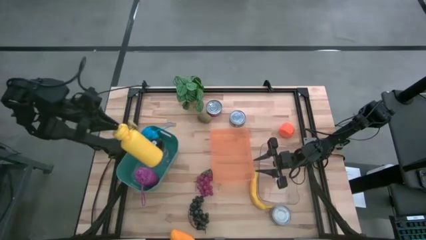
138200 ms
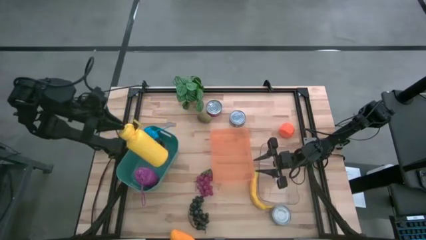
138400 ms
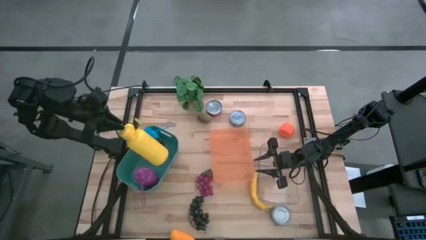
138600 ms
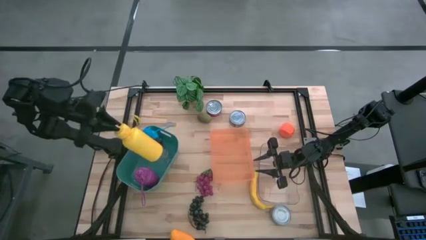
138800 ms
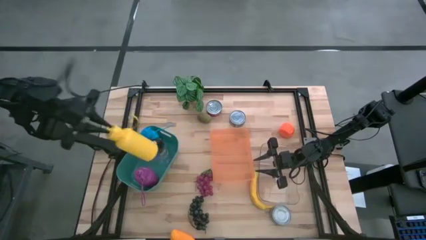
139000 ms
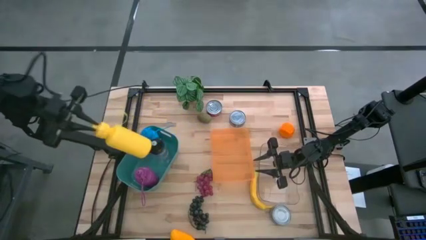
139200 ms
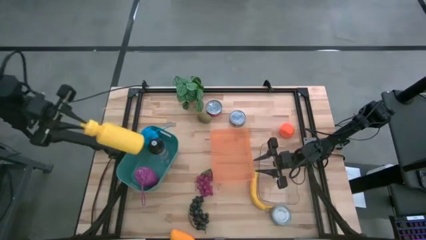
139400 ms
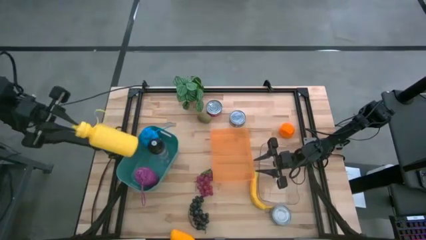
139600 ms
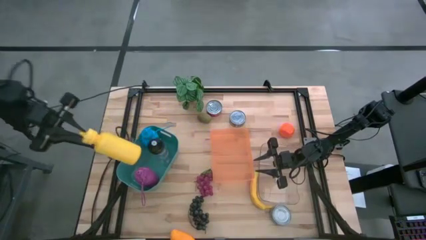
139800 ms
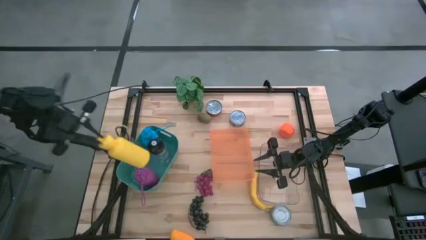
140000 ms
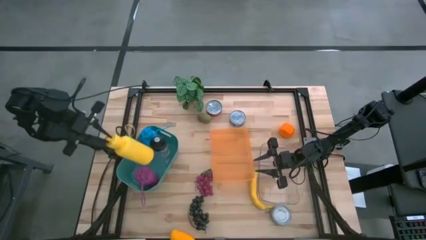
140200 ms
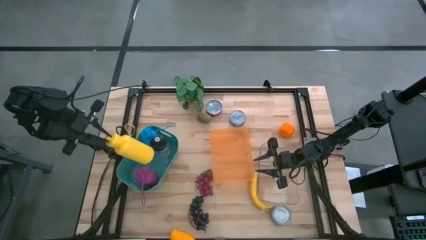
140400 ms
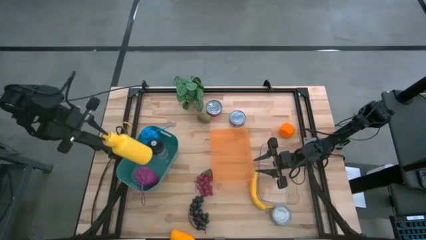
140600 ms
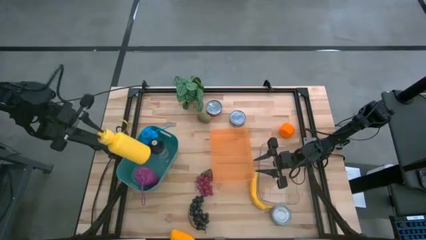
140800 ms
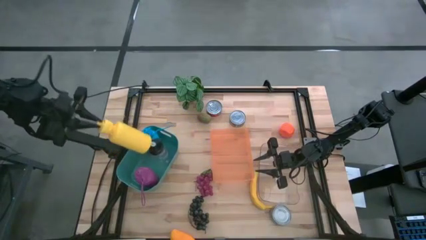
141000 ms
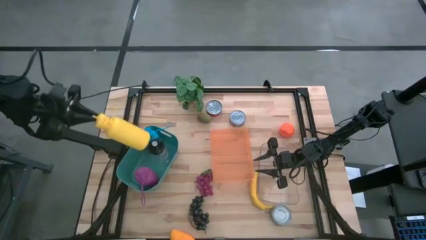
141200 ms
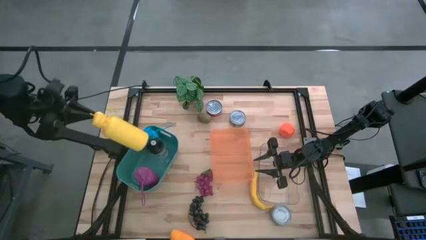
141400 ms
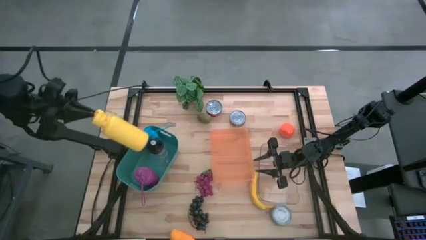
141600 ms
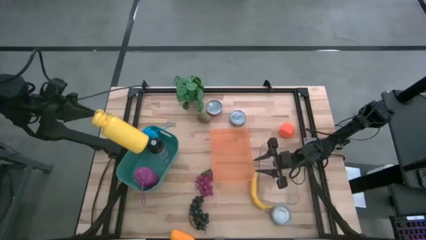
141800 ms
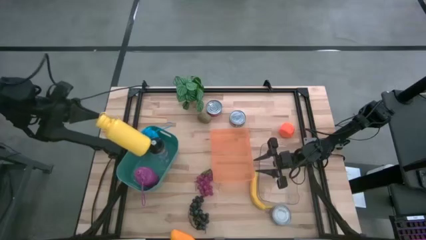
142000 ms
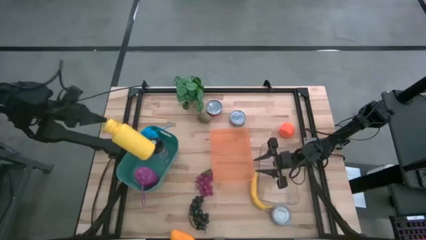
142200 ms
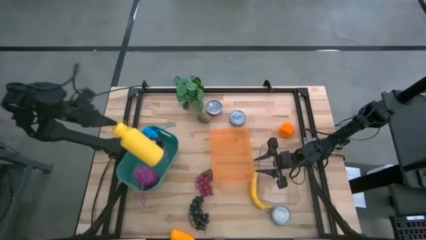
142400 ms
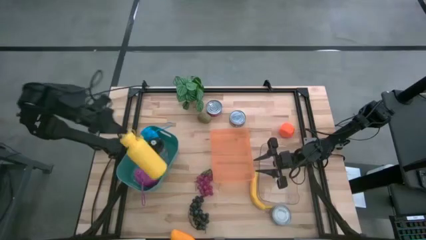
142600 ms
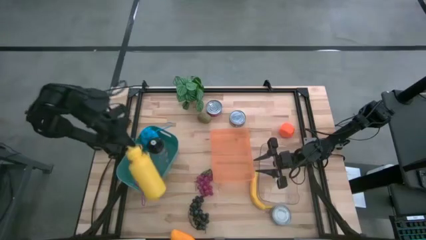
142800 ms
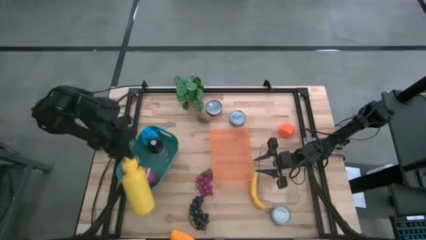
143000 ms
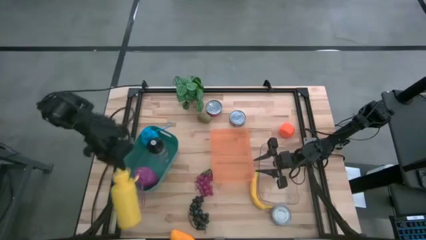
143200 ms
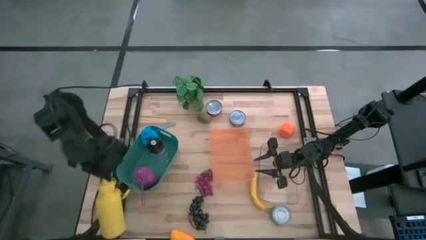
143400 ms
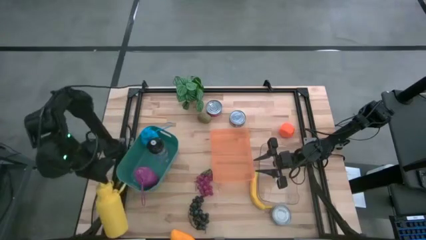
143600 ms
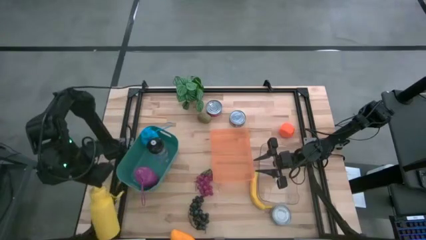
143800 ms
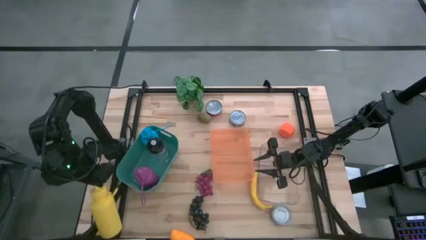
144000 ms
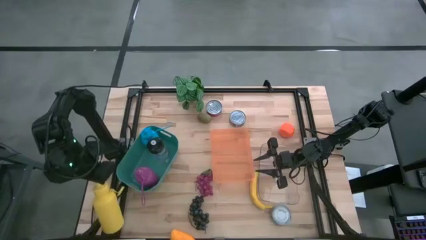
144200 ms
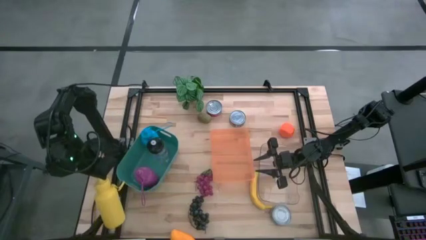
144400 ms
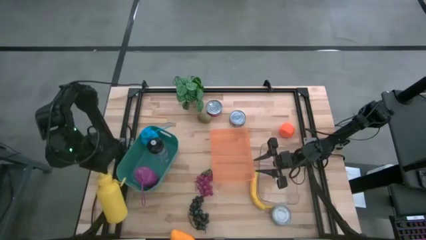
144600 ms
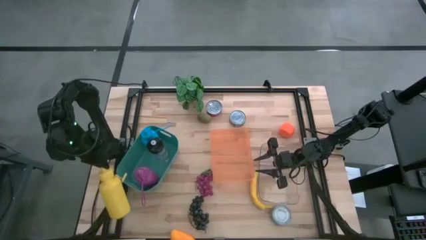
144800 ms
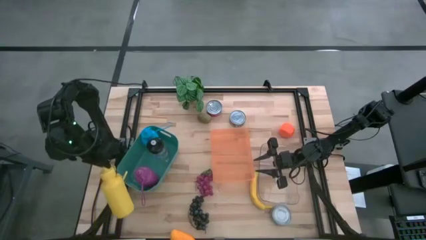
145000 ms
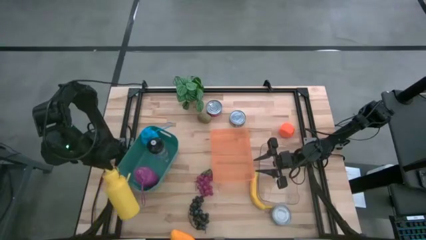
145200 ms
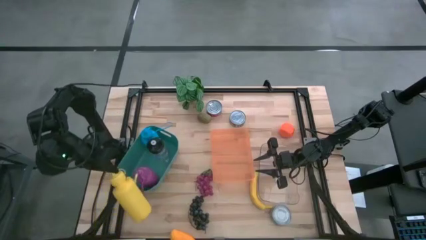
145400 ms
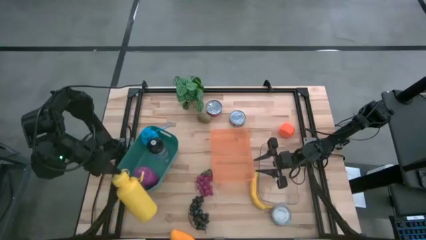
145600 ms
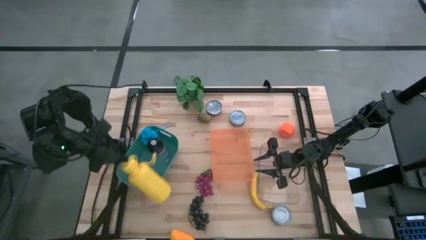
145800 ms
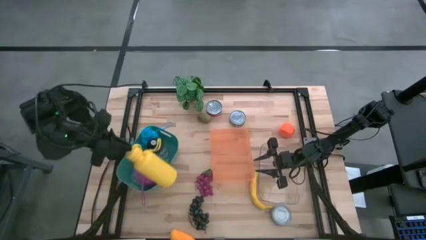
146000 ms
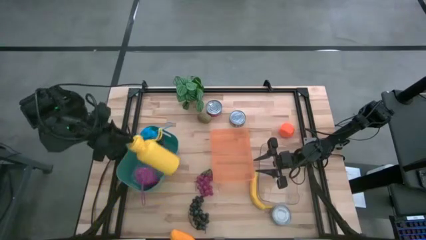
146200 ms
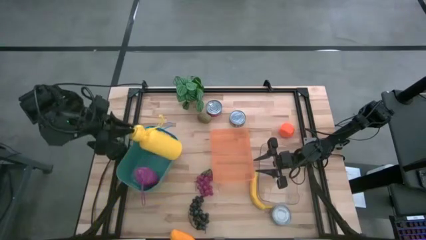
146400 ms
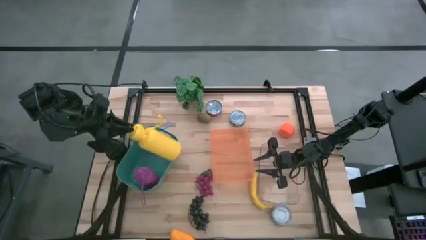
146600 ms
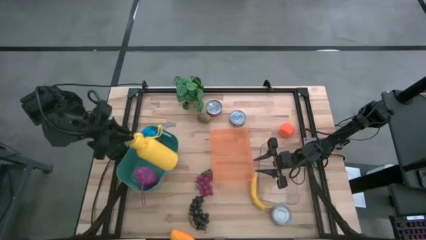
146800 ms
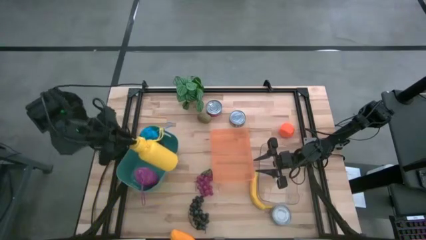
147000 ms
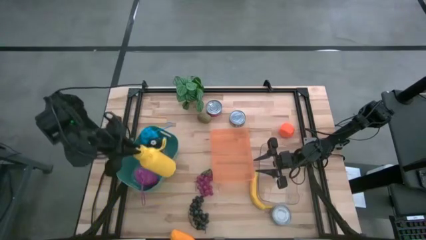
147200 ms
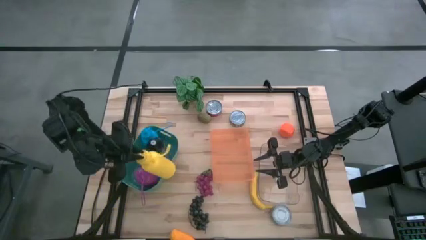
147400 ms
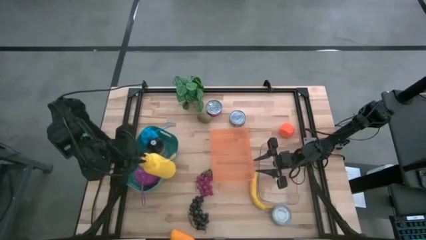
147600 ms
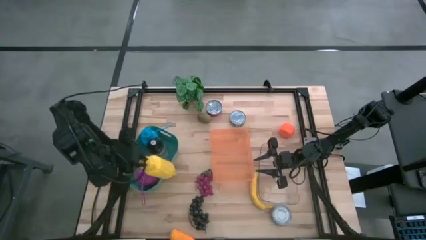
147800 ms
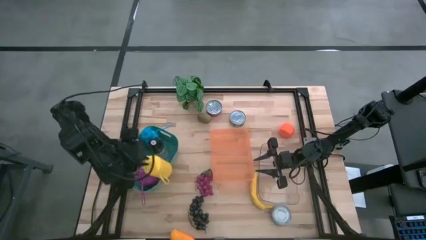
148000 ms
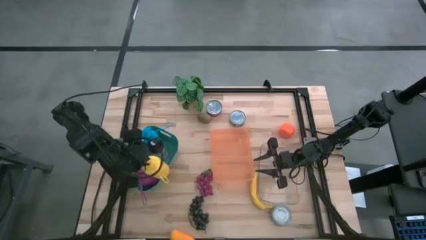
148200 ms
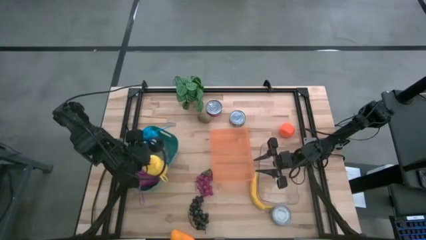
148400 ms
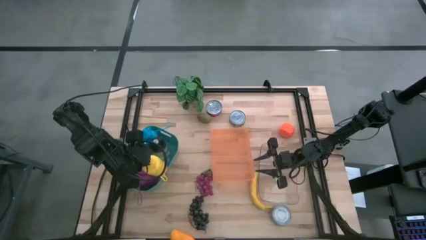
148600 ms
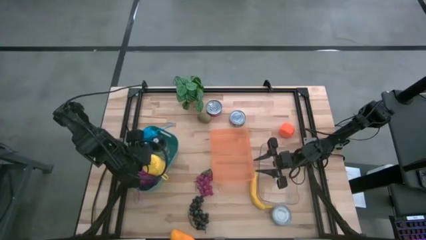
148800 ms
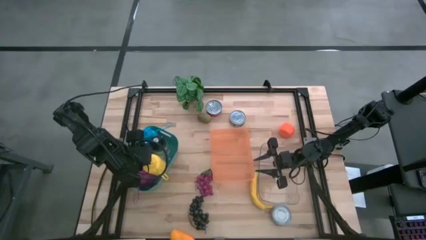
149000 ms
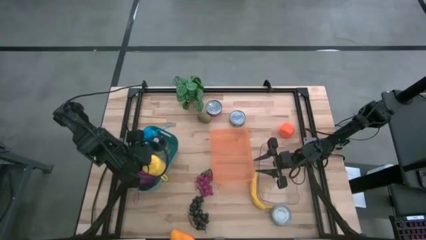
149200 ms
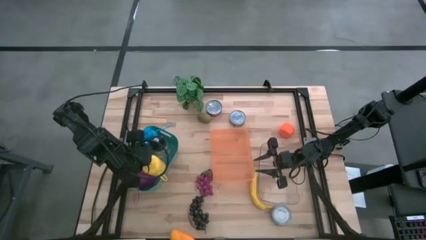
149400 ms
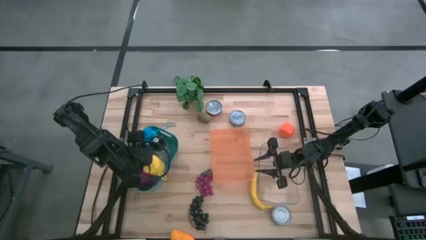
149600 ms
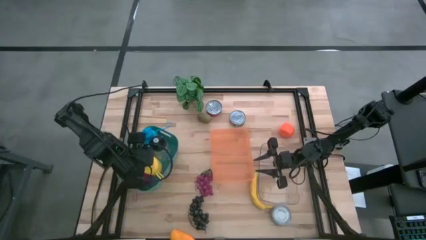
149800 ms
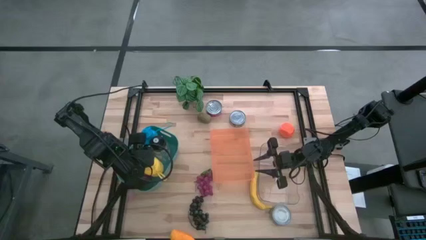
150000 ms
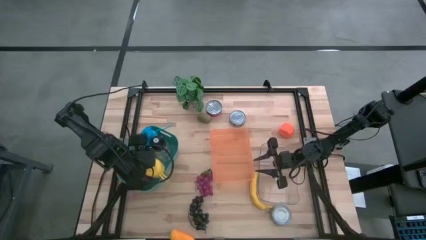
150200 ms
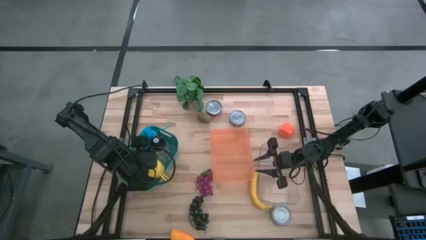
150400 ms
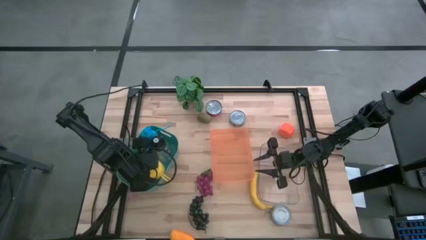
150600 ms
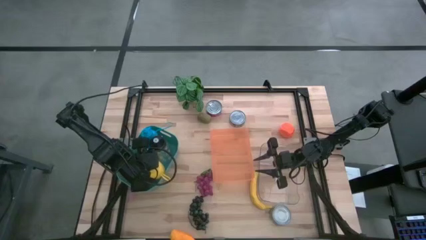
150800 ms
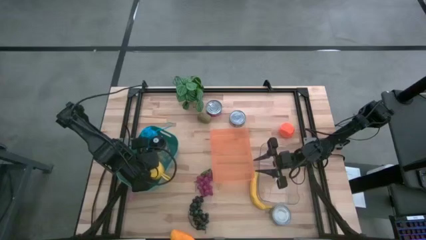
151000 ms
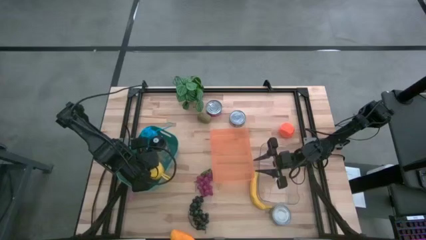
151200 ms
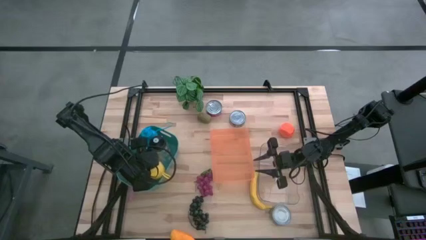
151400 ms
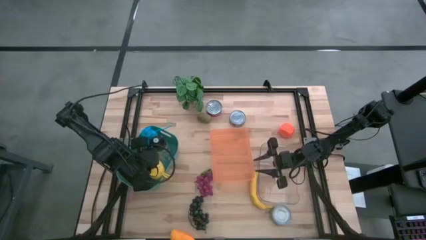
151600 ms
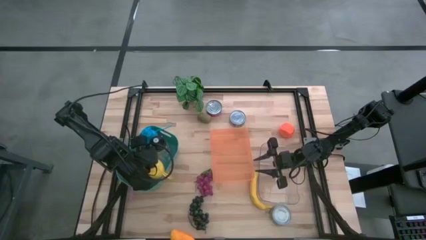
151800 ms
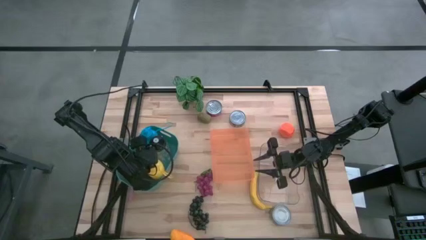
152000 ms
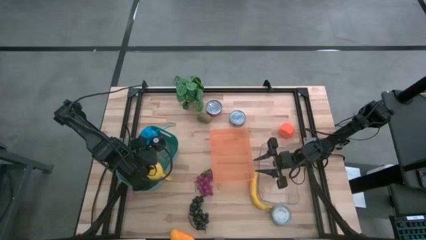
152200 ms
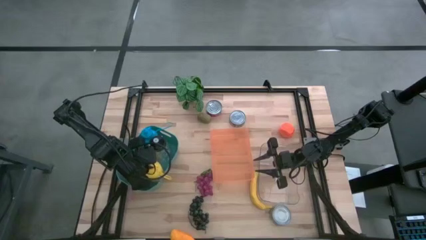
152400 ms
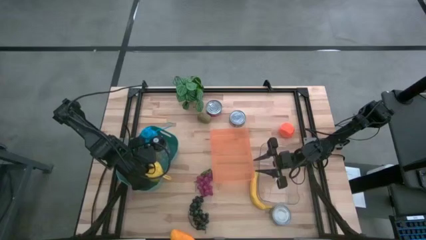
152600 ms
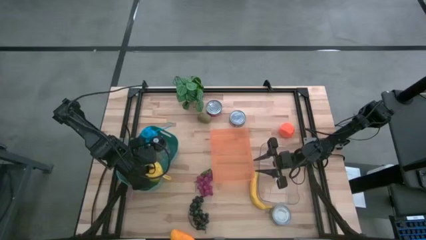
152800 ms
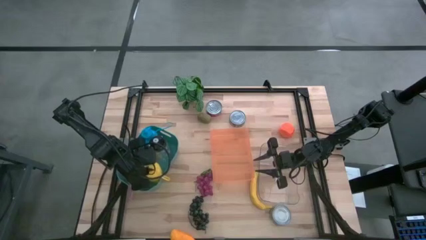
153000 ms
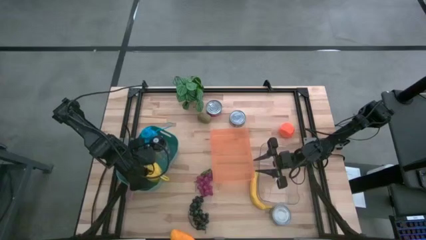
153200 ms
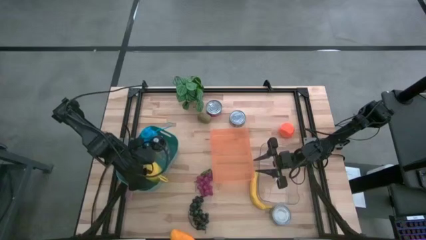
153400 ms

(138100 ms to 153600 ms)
Task: Pick & Place Food Item
Put the yellow water bottle into the green bin
